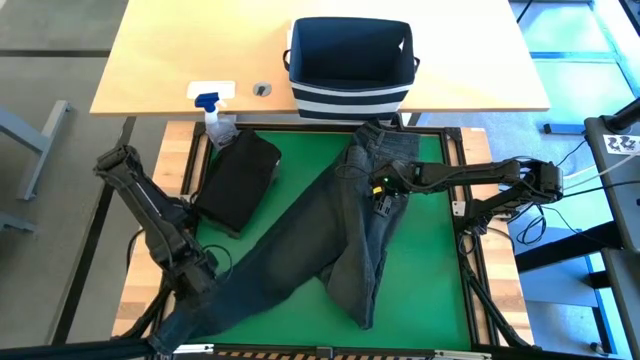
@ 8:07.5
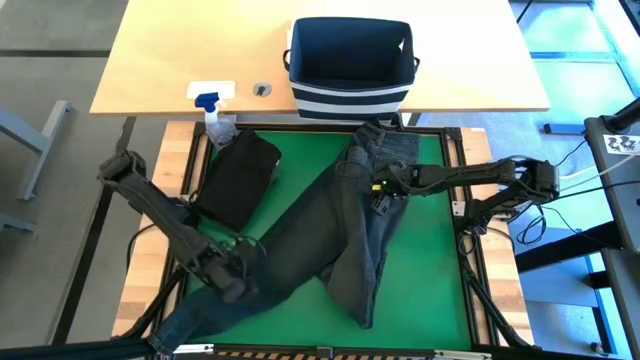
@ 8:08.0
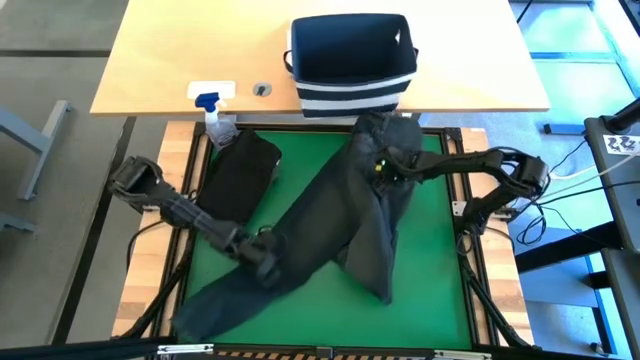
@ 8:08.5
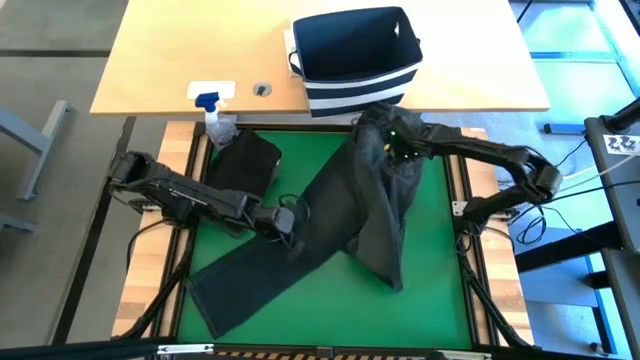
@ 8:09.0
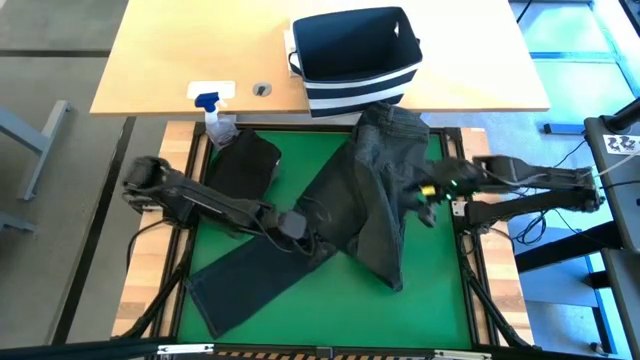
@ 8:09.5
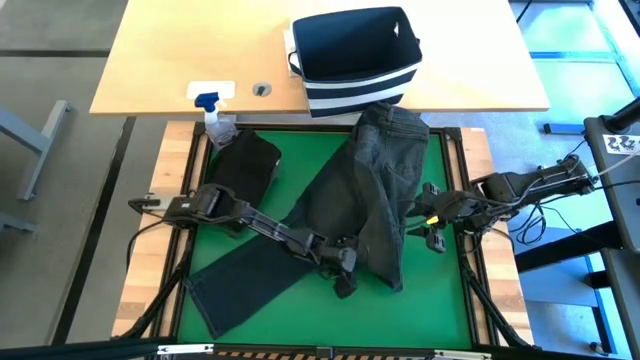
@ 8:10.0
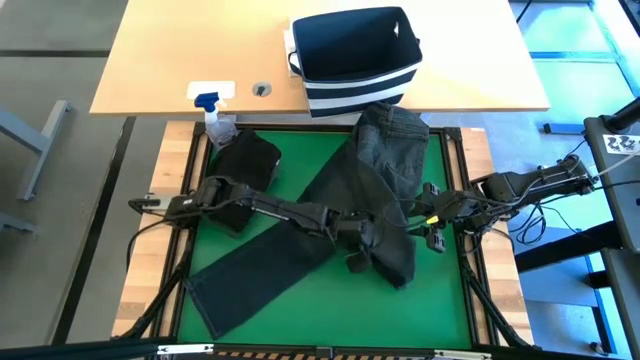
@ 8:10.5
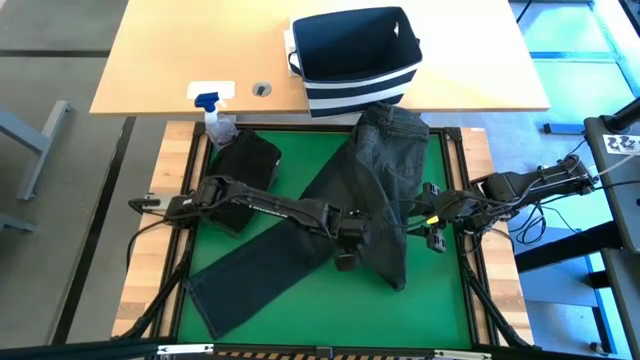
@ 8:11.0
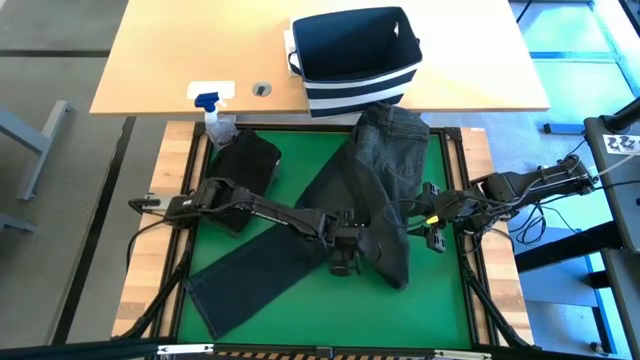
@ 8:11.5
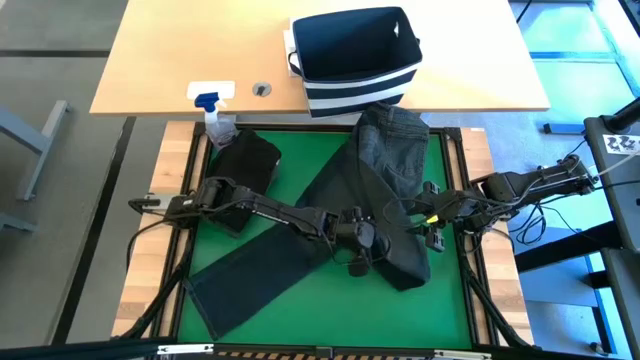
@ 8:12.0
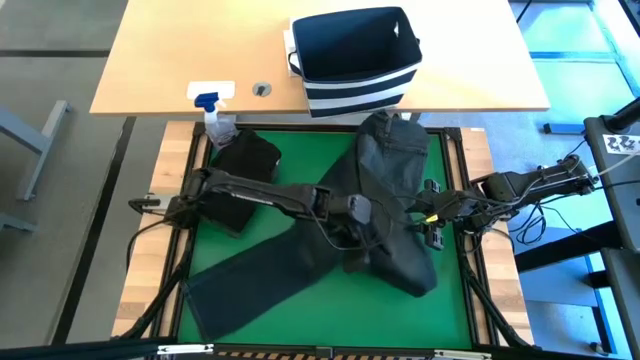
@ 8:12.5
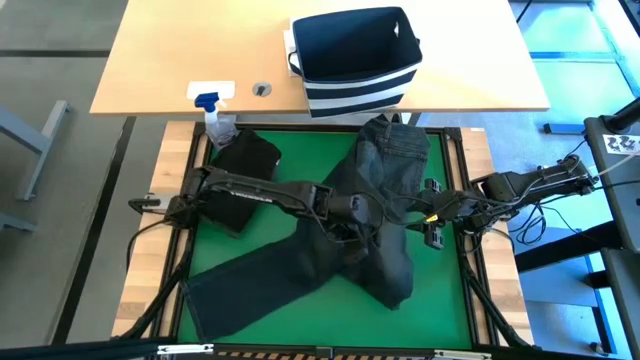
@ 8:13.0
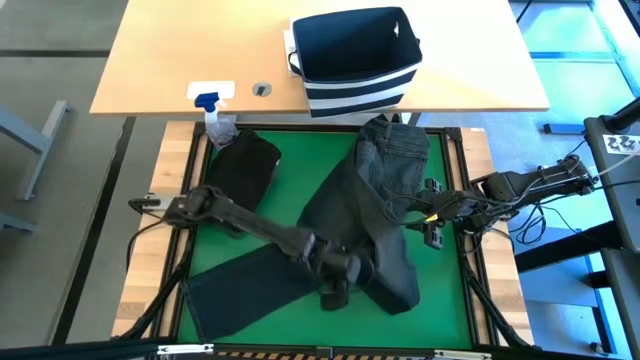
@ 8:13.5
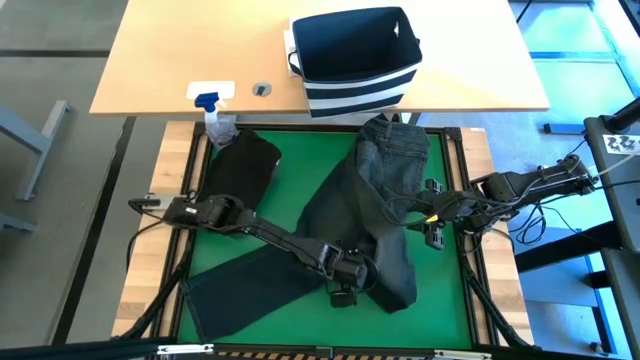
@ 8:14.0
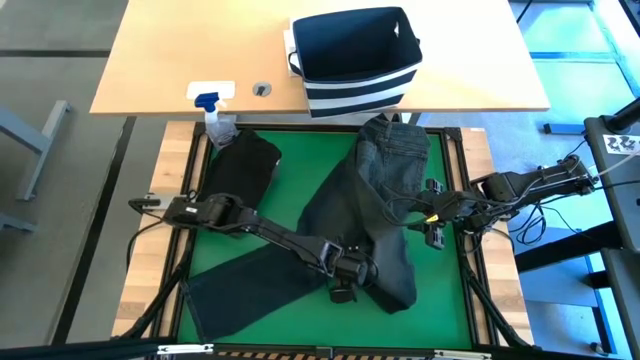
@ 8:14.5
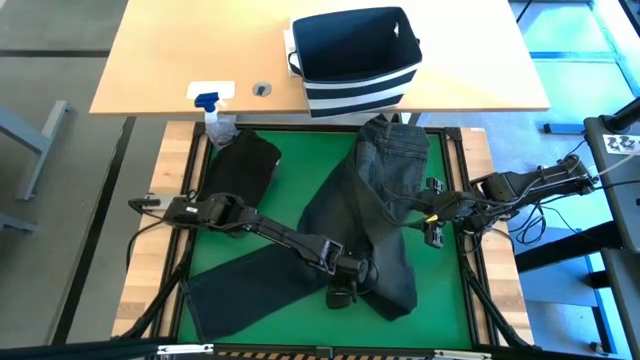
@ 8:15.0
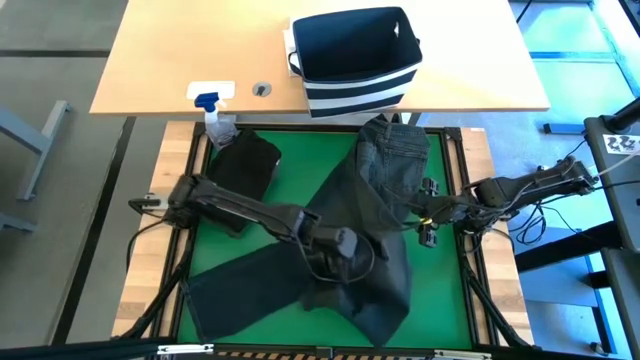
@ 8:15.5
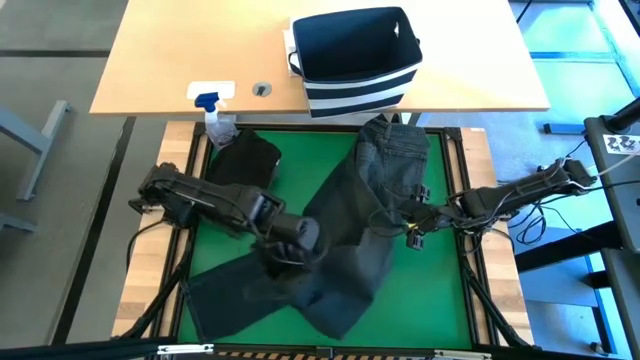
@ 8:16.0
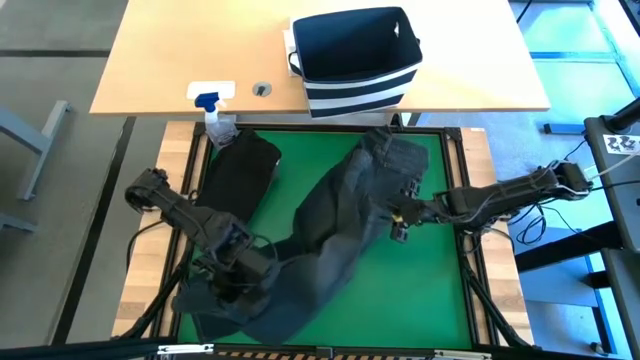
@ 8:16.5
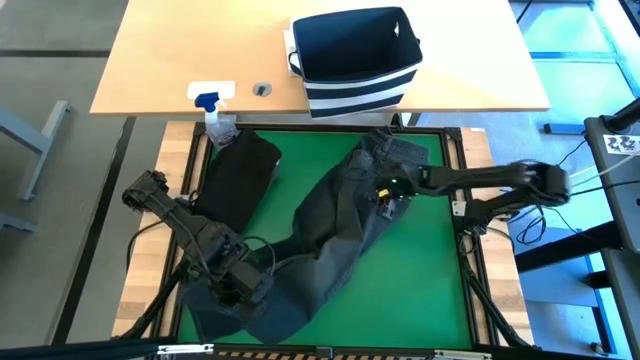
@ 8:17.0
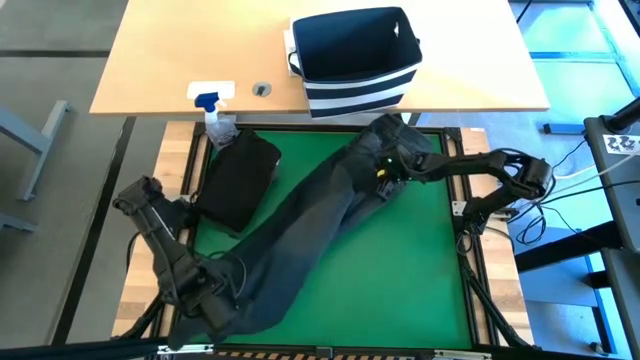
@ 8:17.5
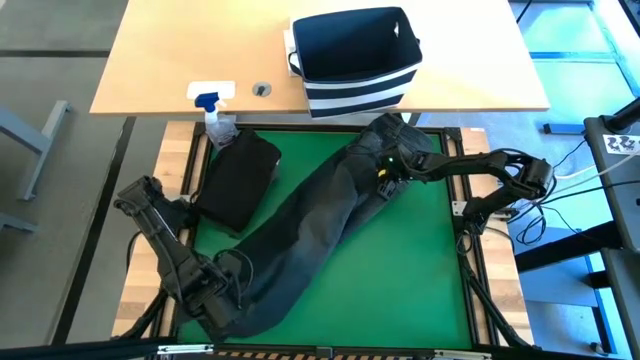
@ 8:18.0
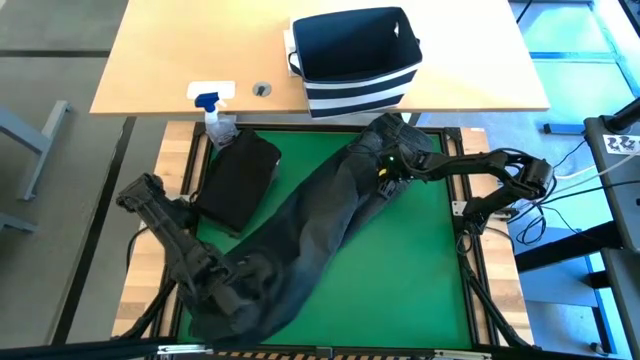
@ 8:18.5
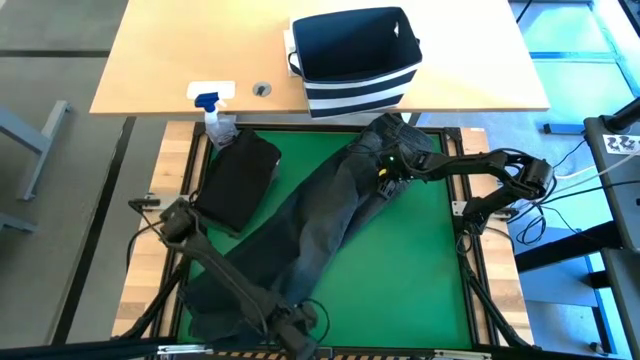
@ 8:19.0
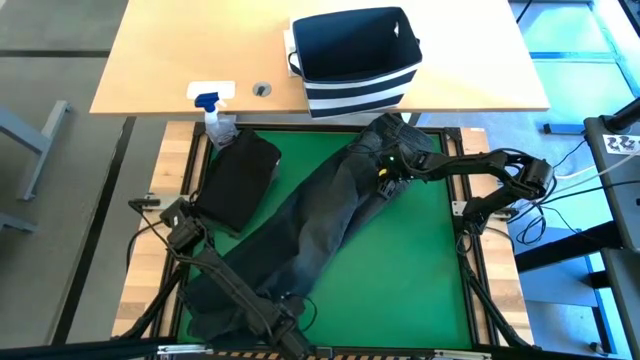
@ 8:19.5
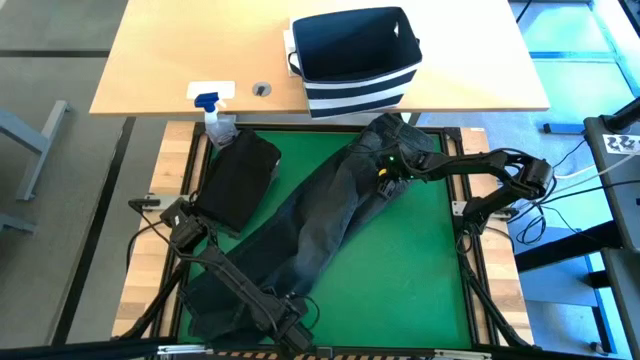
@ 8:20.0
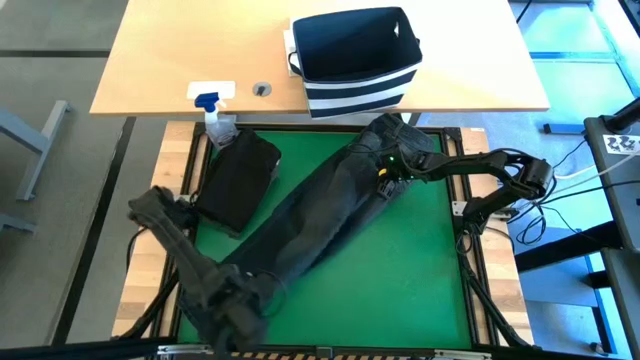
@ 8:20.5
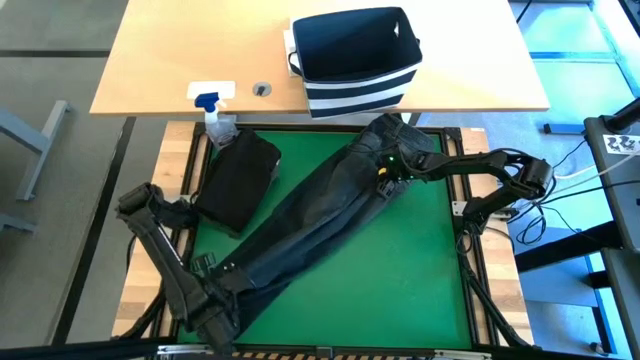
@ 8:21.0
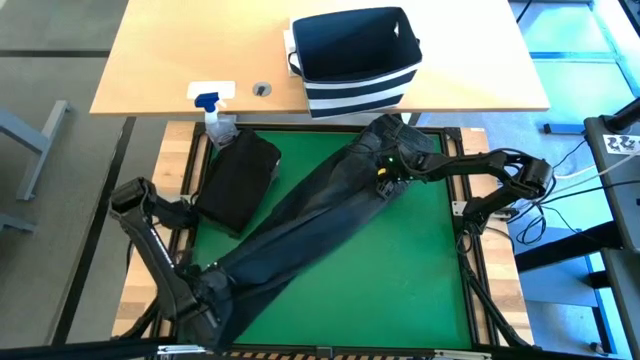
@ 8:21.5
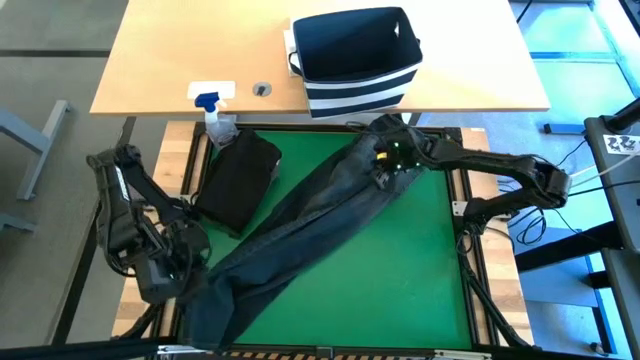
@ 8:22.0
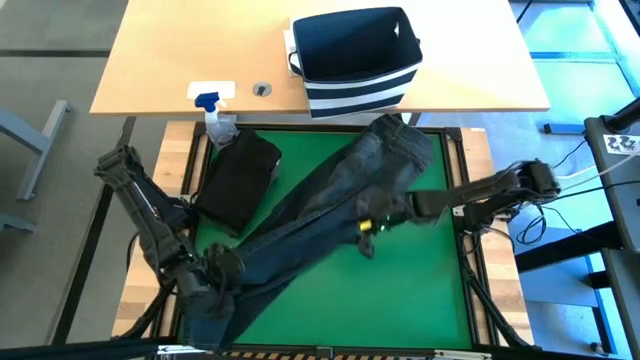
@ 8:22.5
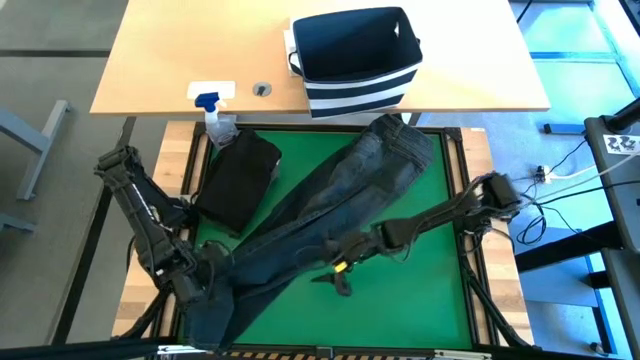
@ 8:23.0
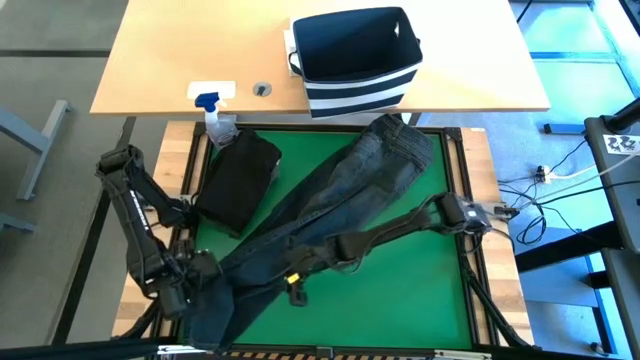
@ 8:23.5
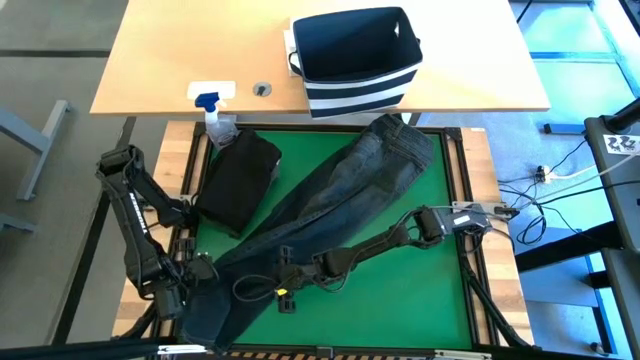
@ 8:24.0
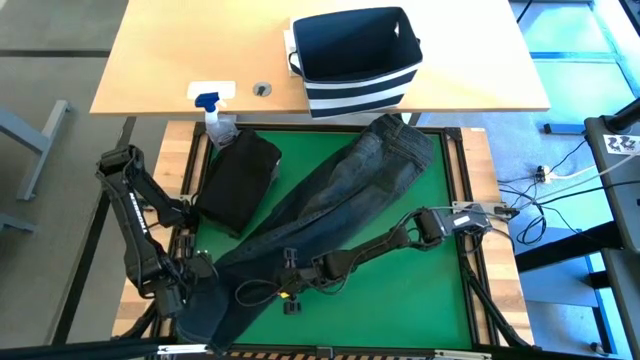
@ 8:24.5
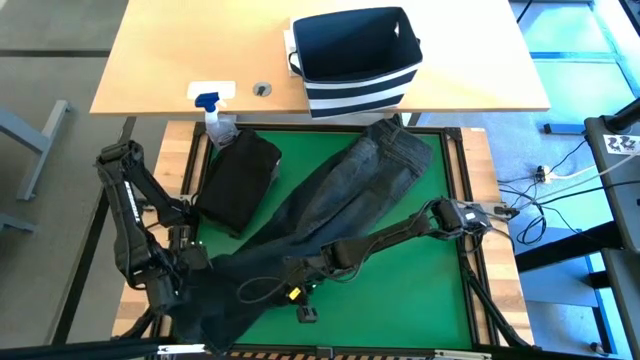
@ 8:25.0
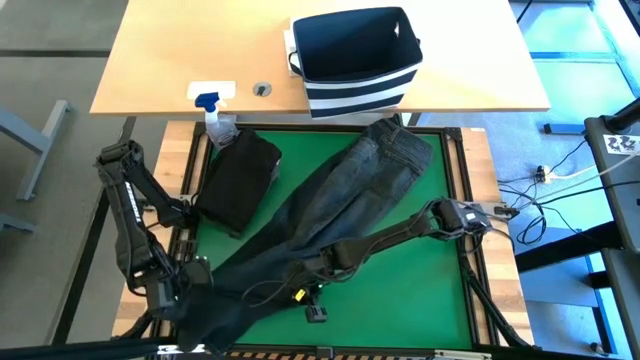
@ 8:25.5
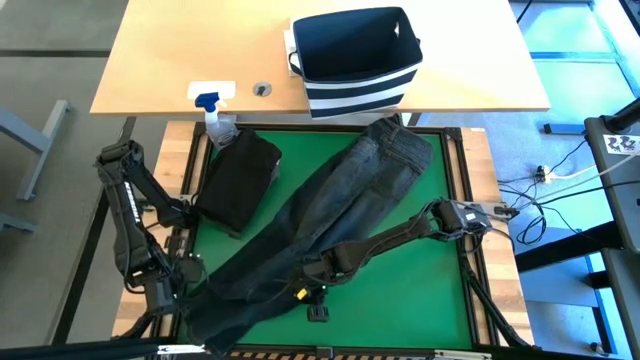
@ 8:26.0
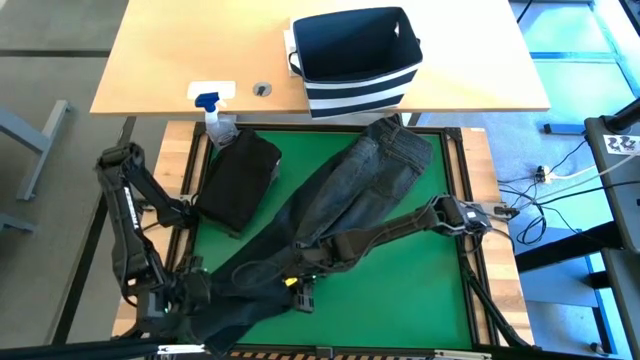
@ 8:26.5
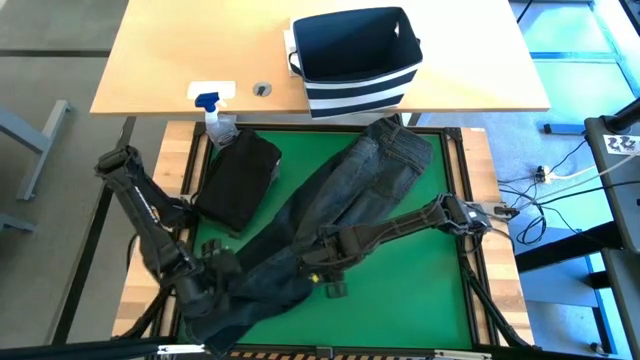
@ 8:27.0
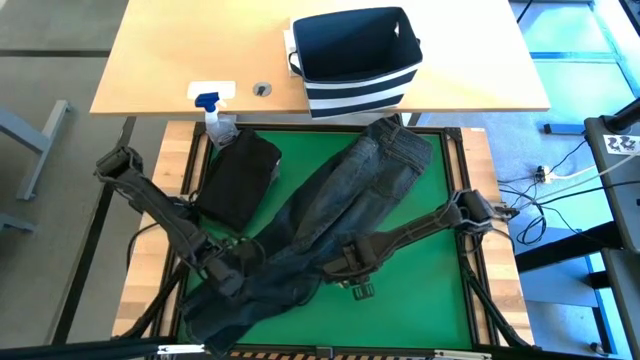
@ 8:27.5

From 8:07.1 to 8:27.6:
Task: Fold Laundry from Bin
Fold the blue pants

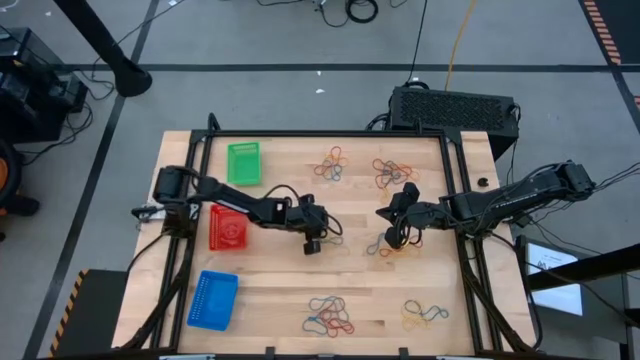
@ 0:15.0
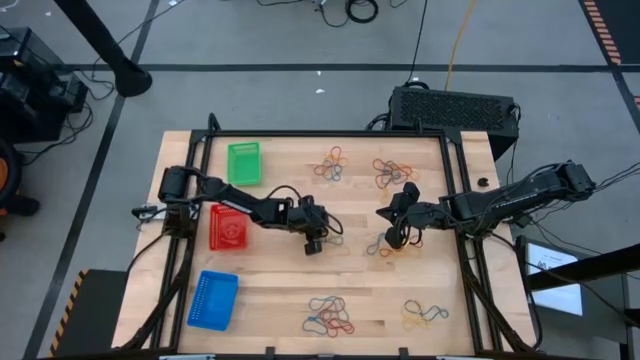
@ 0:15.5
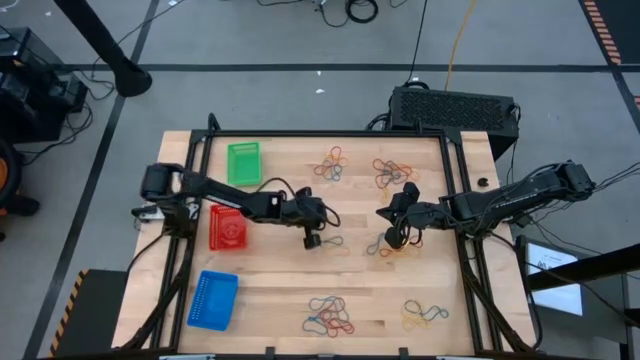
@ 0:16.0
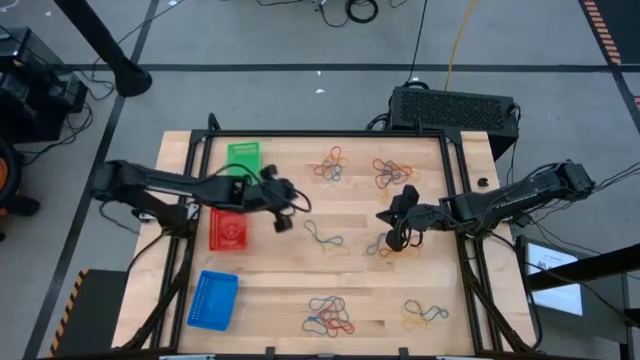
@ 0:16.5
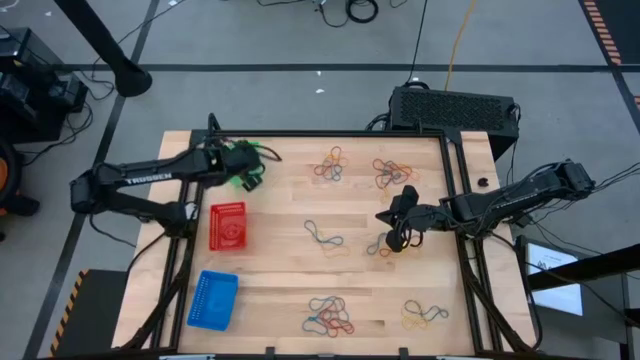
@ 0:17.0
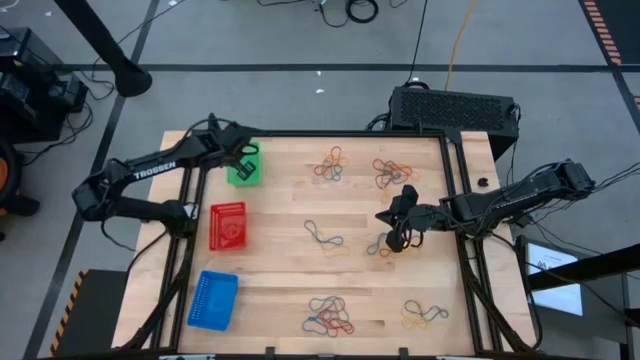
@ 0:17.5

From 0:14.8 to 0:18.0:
Task: Sort rubber bands into baskets
Put the yellow rubber band into the green bin
